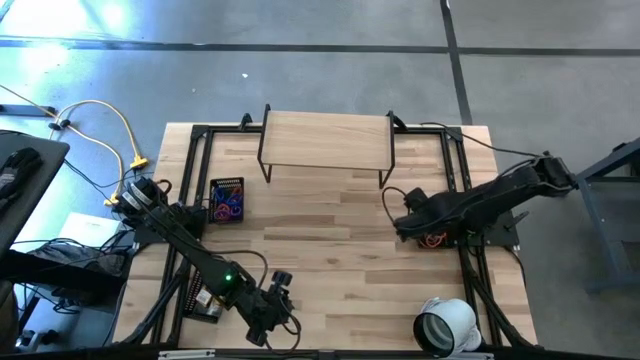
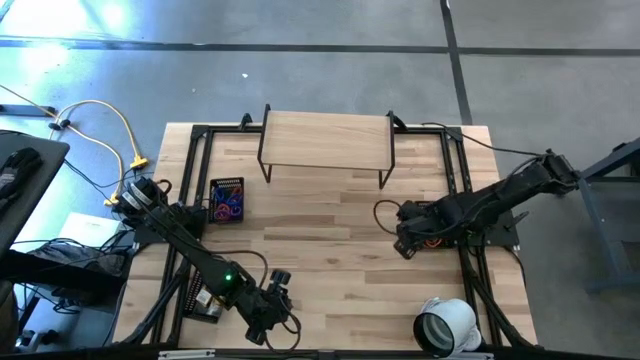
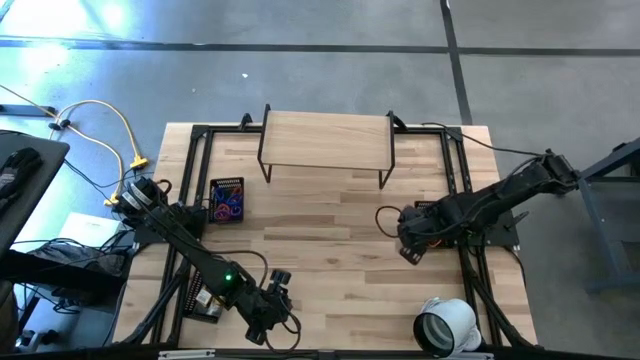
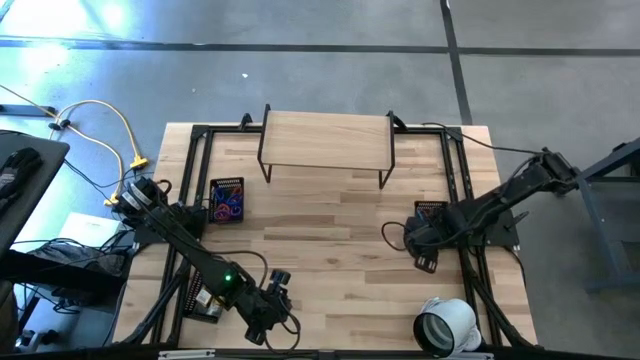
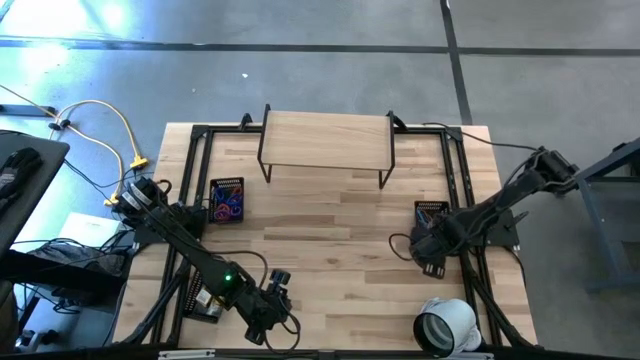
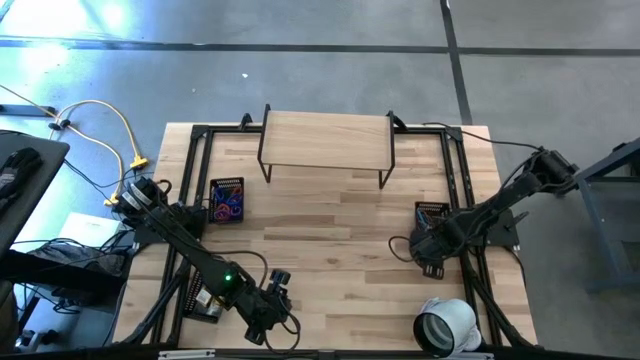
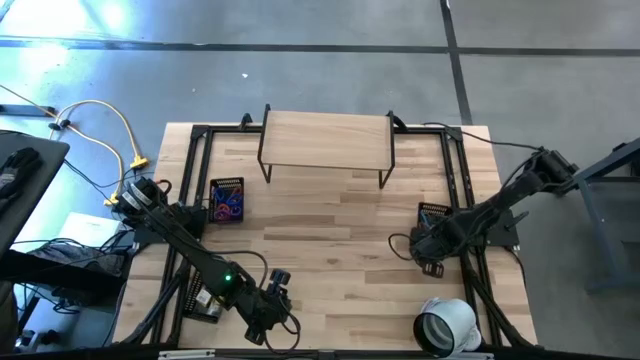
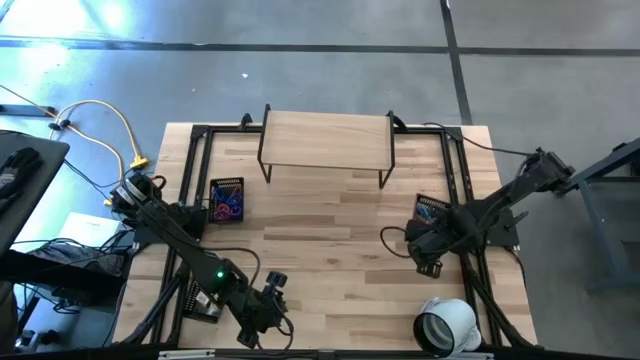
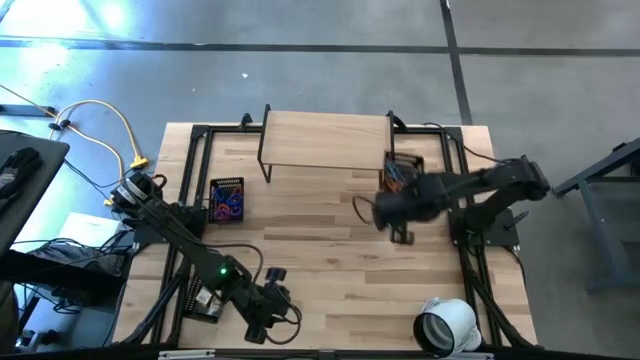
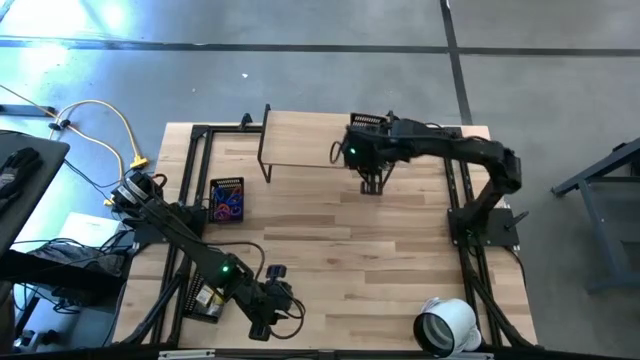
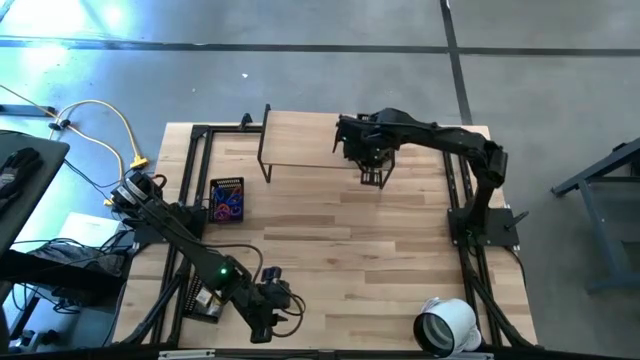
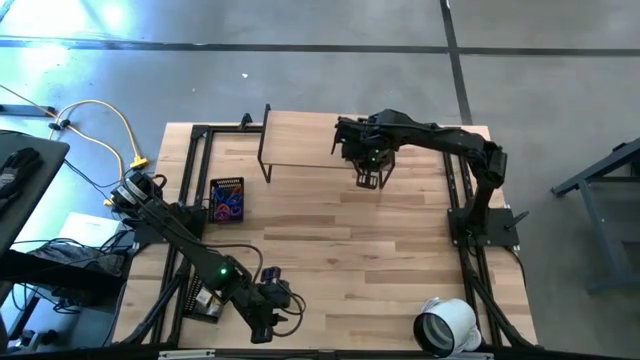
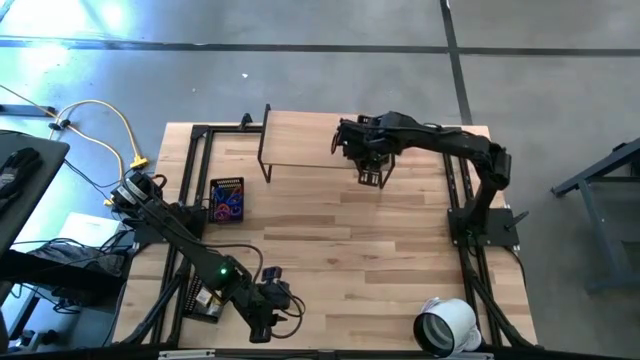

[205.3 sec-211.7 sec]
Task: Pick & Place Office Desk Supplies
Put the top right black bin on the shelf

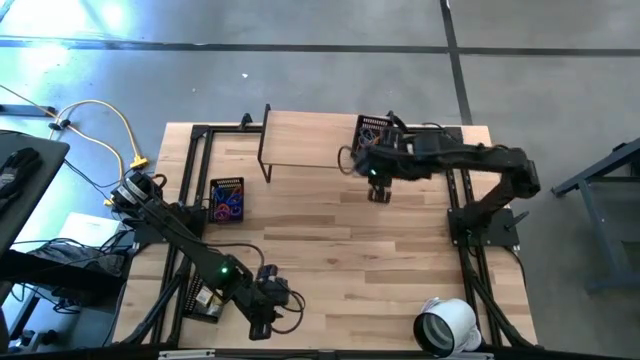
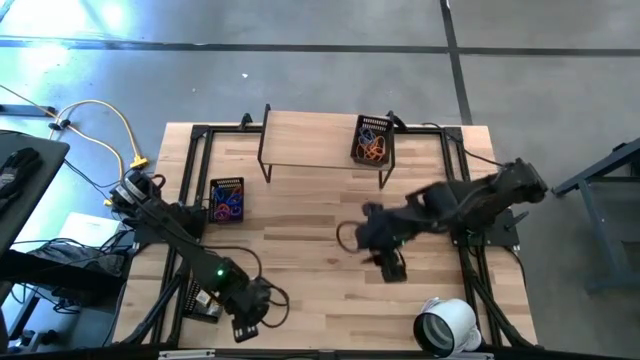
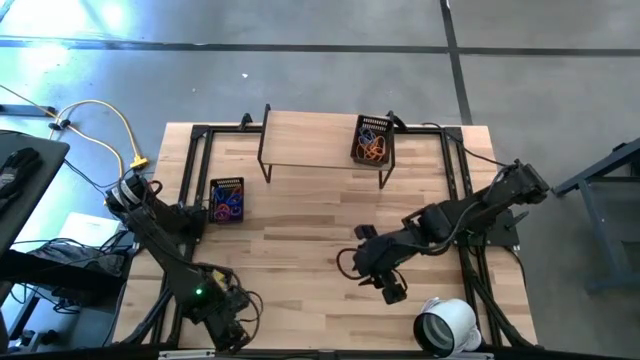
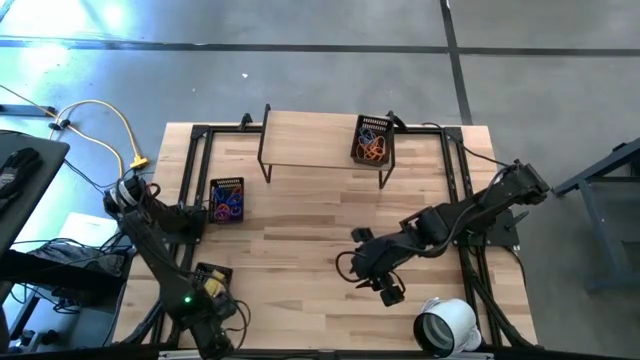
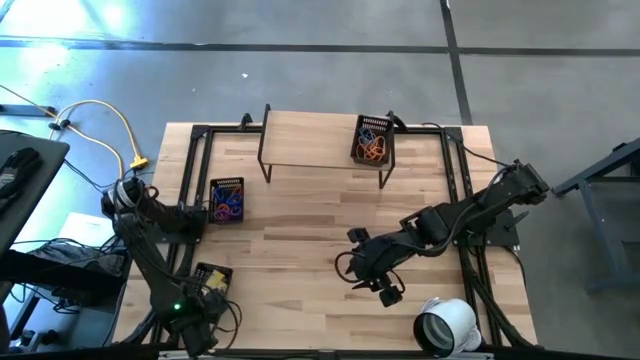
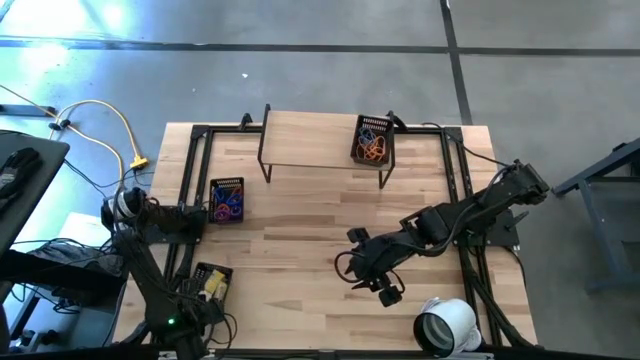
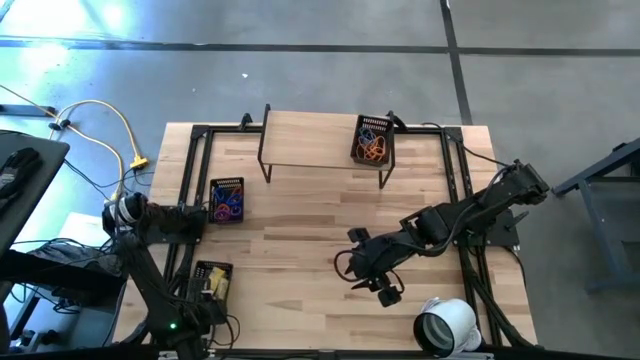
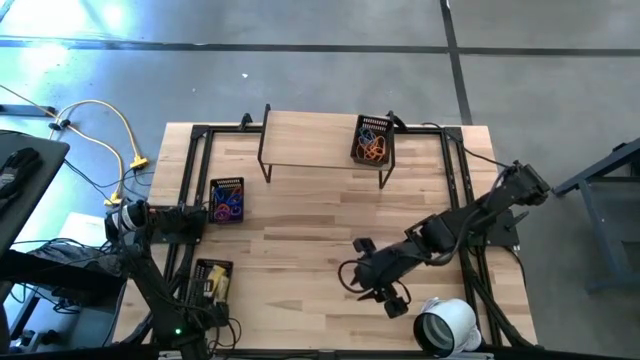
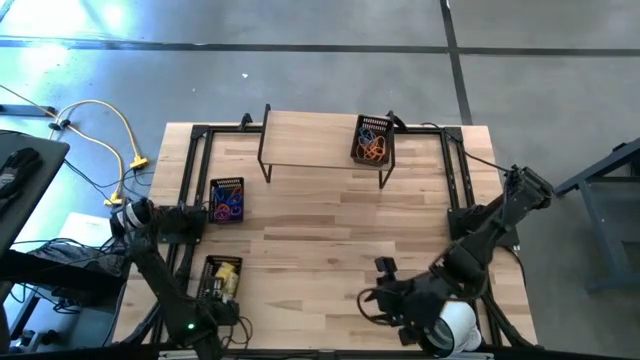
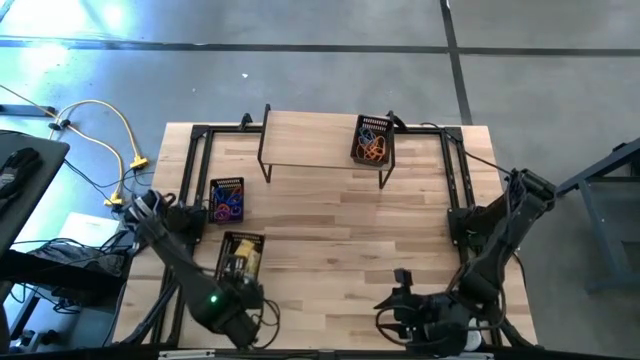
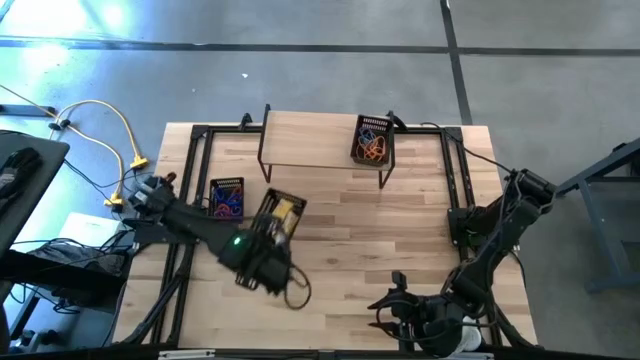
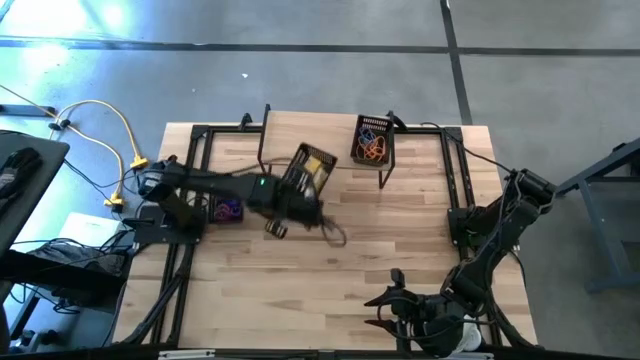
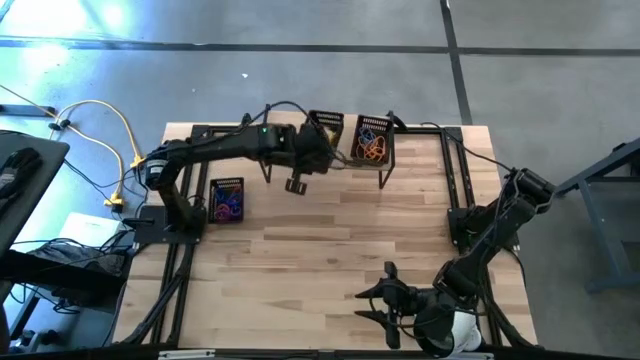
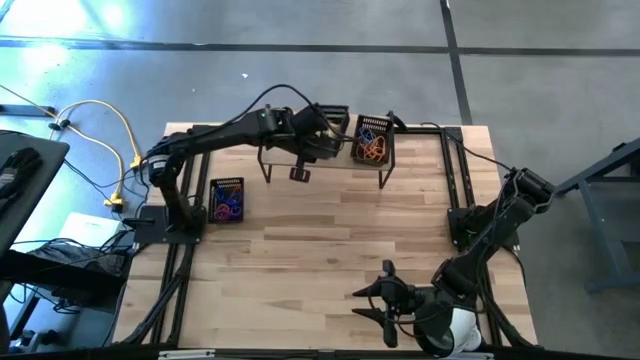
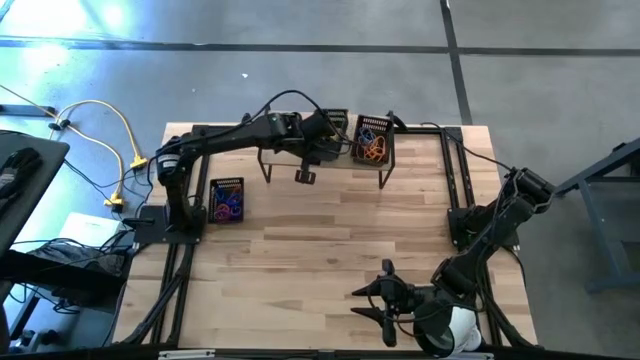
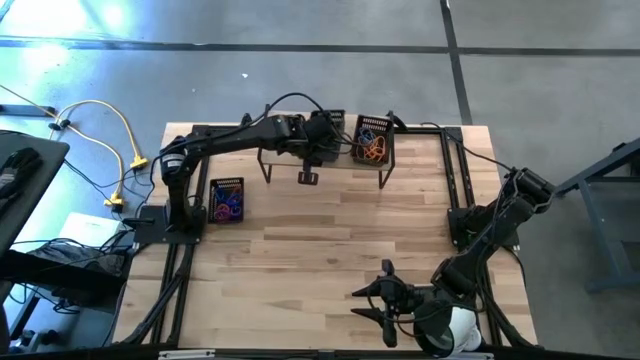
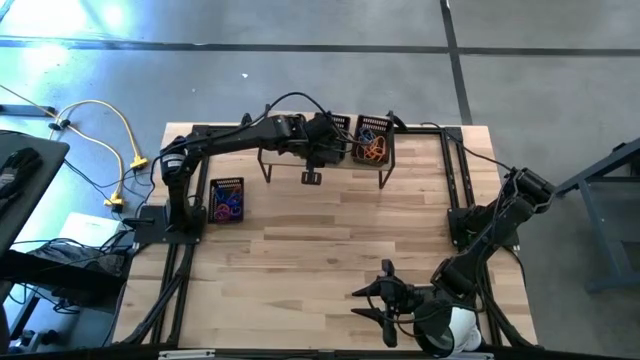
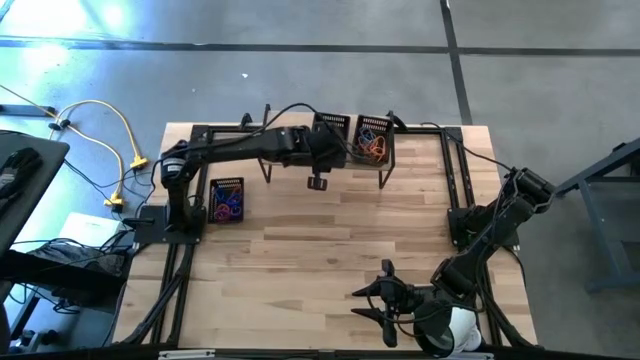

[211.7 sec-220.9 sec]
Put the bottom black bin on the shelf

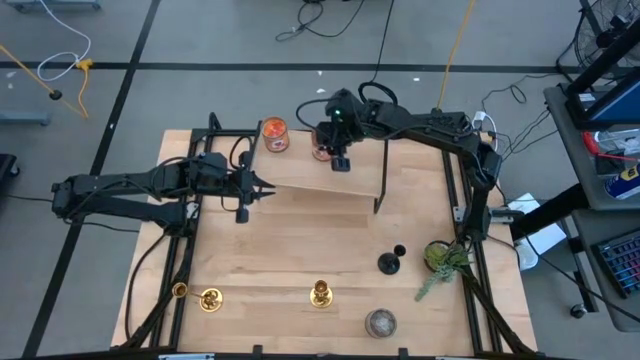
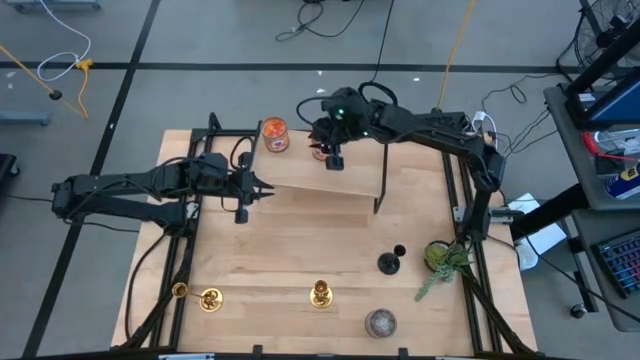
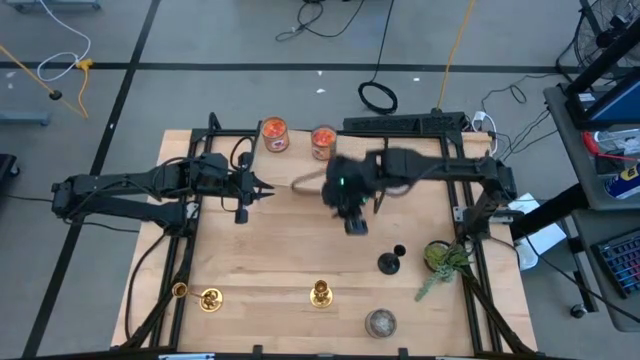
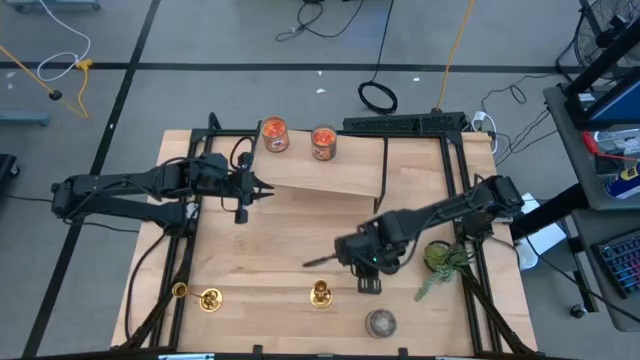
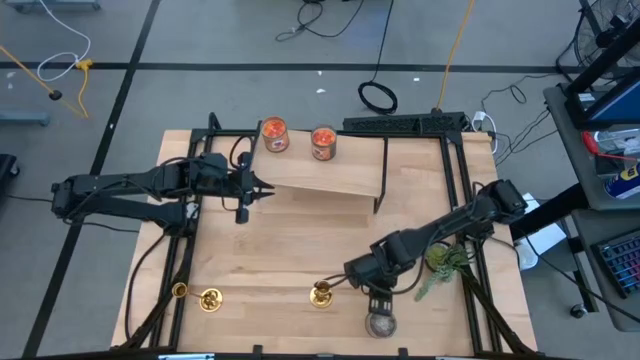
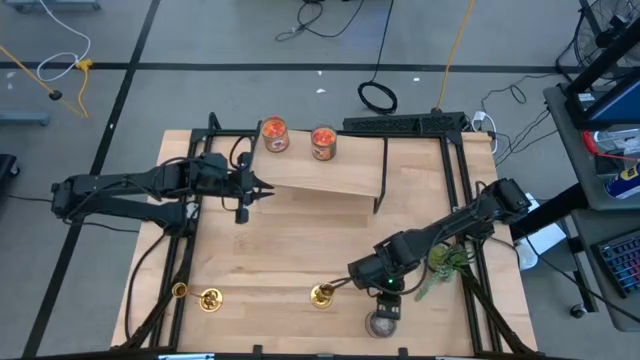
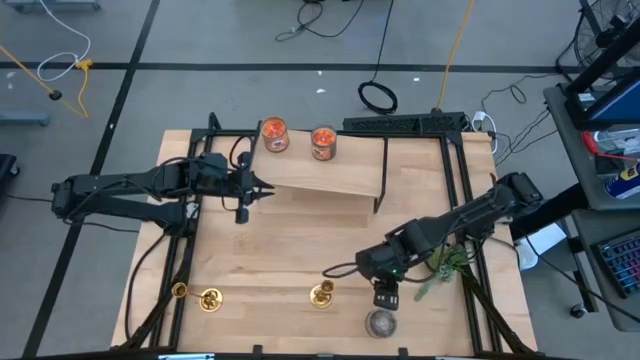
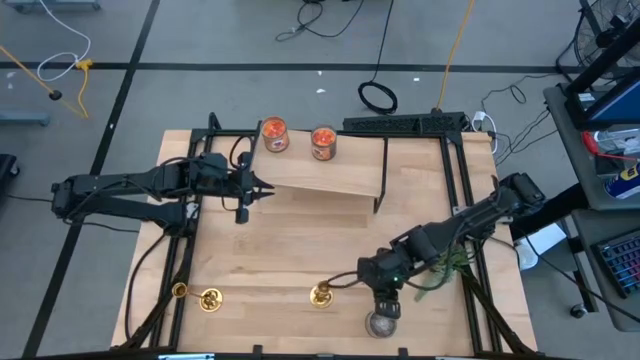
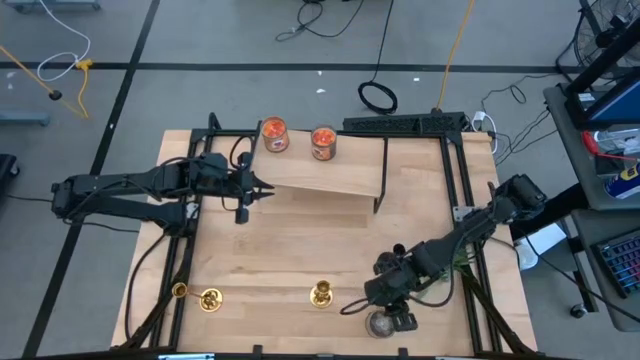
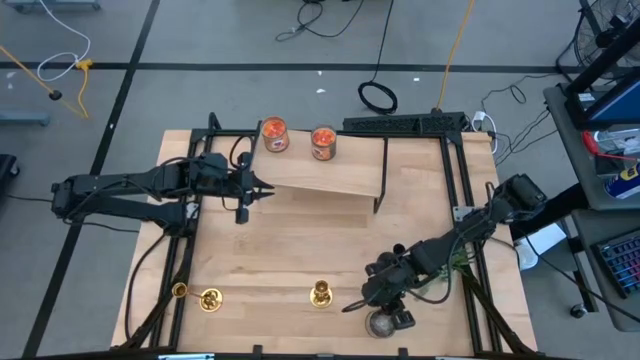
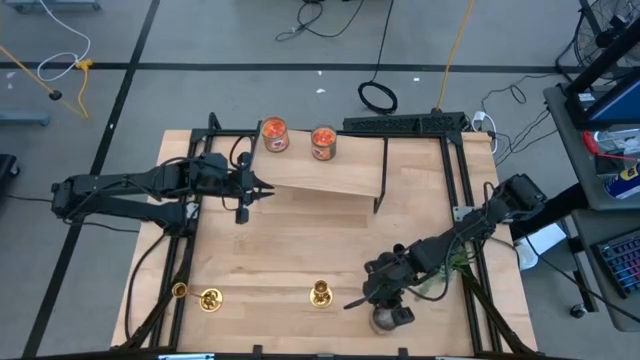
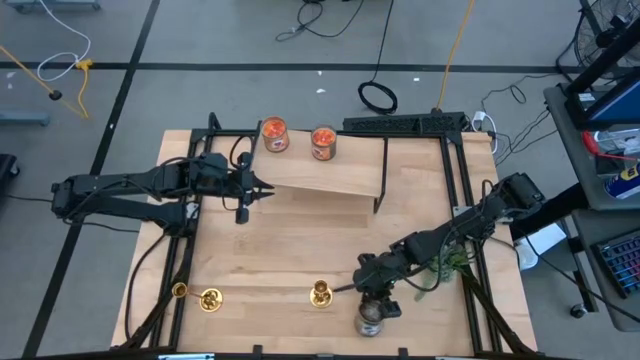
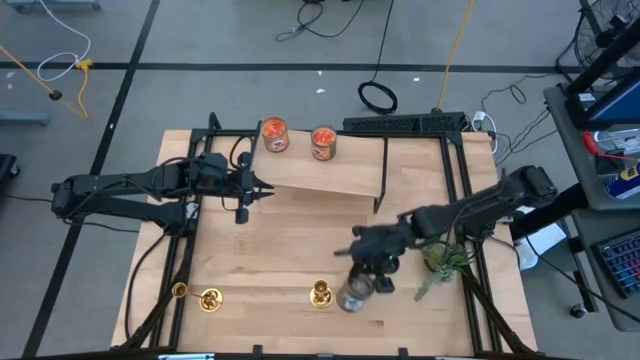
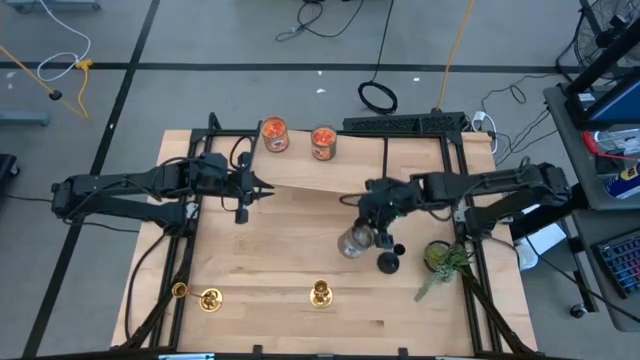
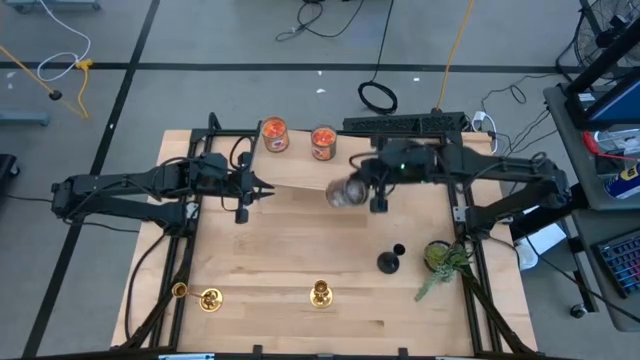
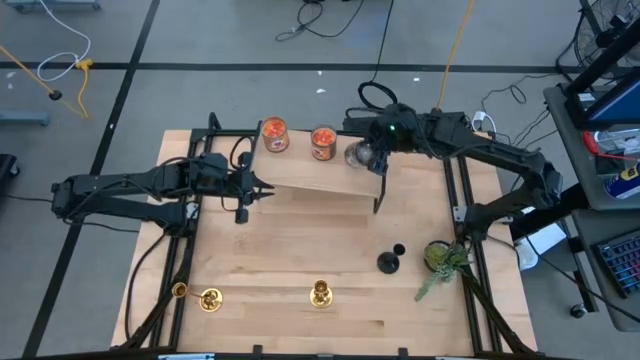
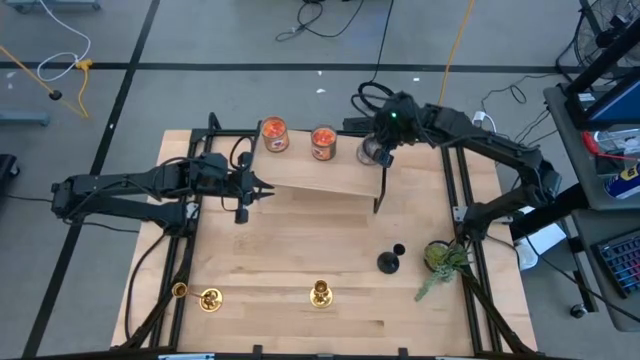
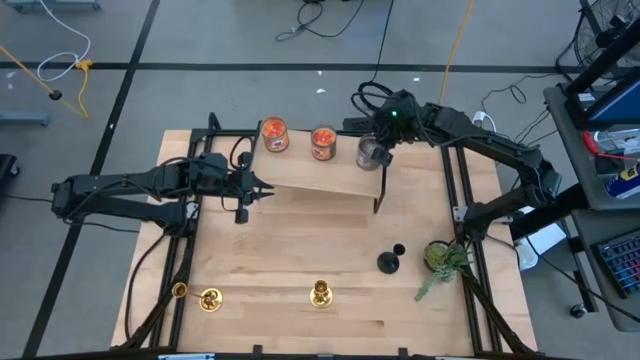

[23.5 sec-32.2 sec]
Task: Pick & Place candle stick holders
Put the red scented candle on the shelf
